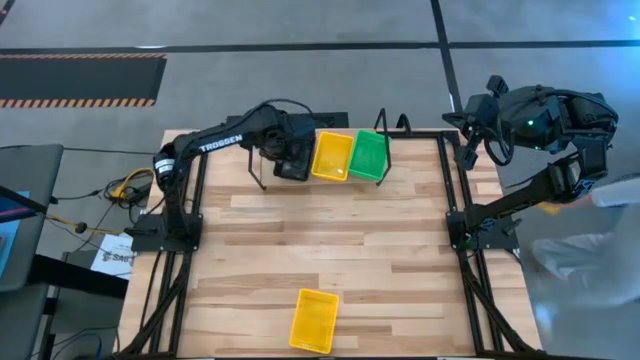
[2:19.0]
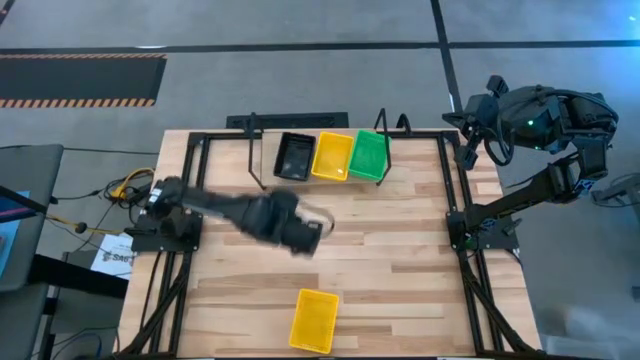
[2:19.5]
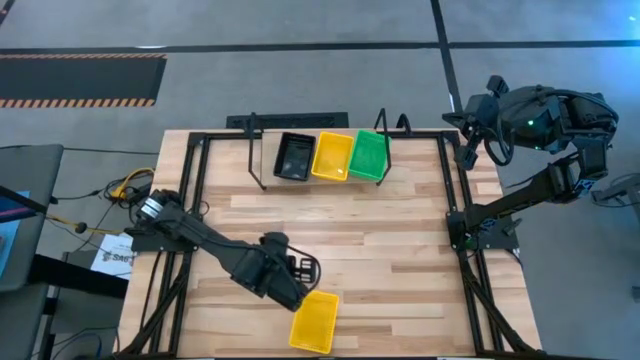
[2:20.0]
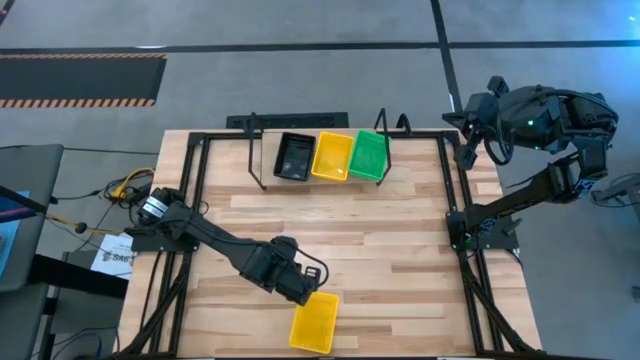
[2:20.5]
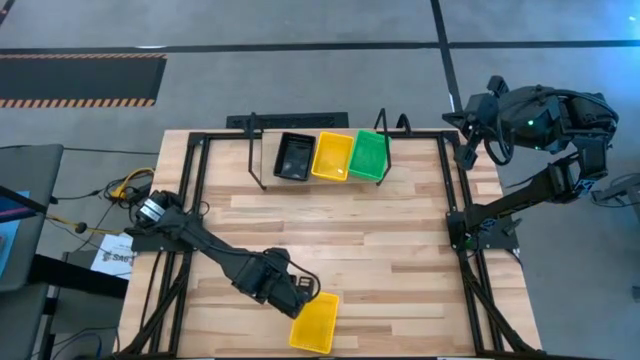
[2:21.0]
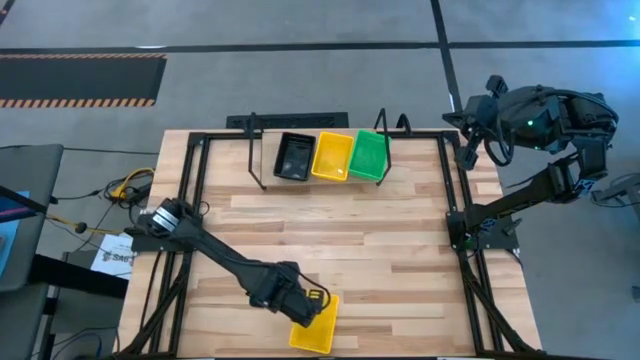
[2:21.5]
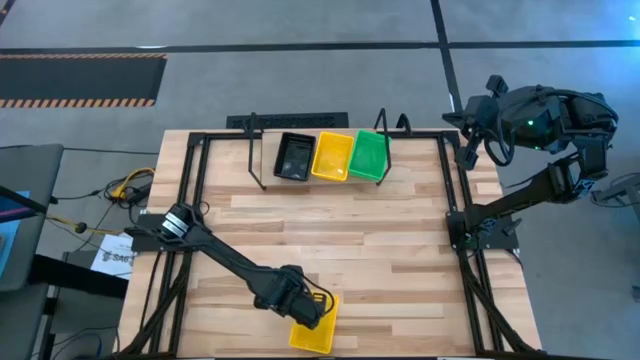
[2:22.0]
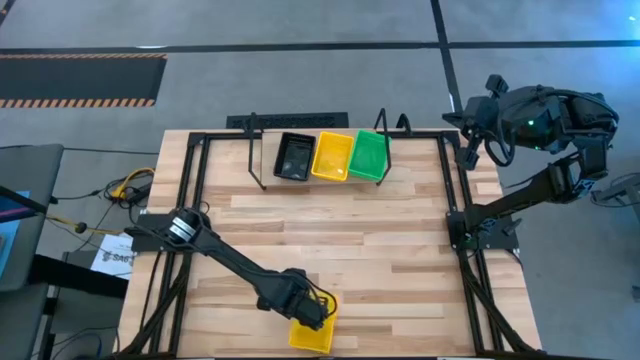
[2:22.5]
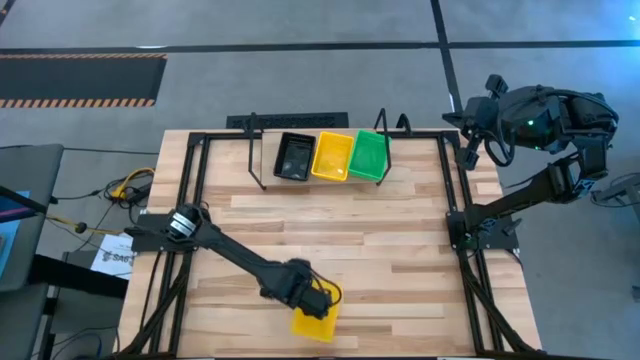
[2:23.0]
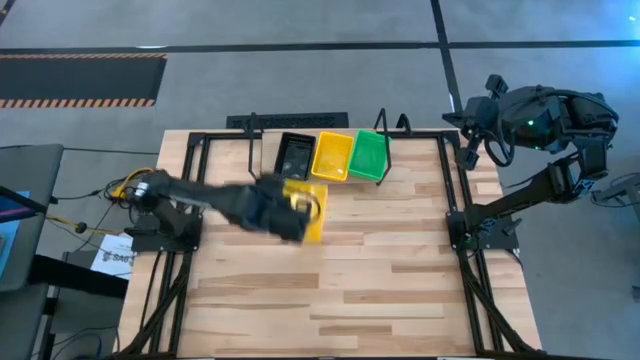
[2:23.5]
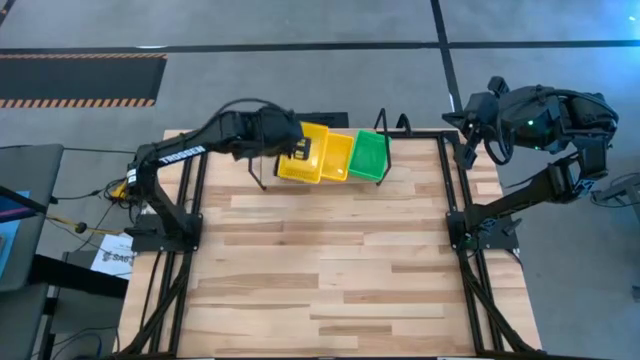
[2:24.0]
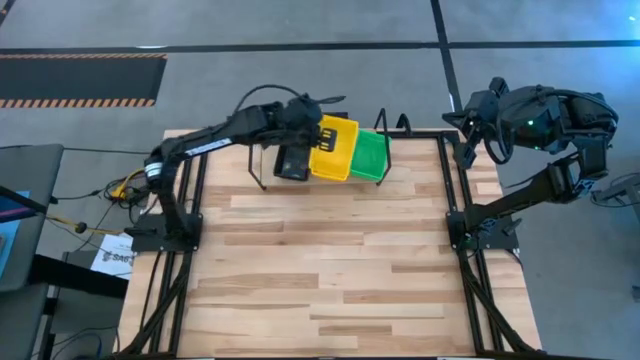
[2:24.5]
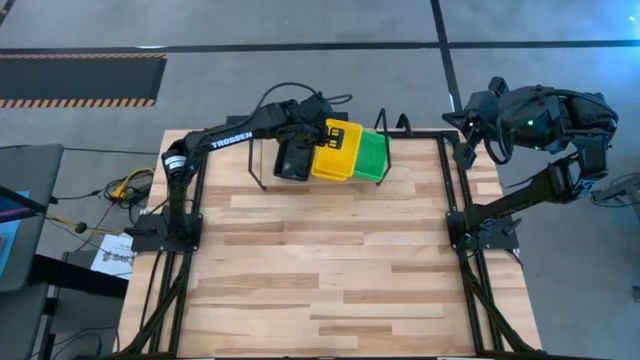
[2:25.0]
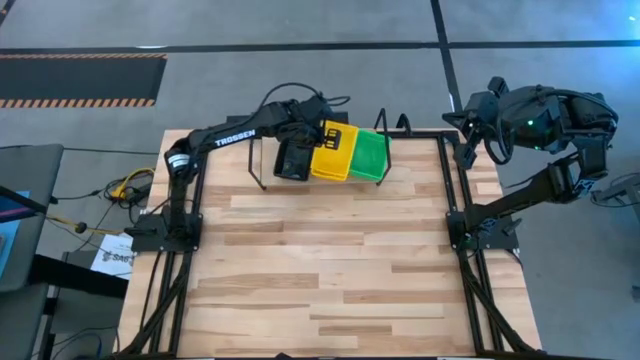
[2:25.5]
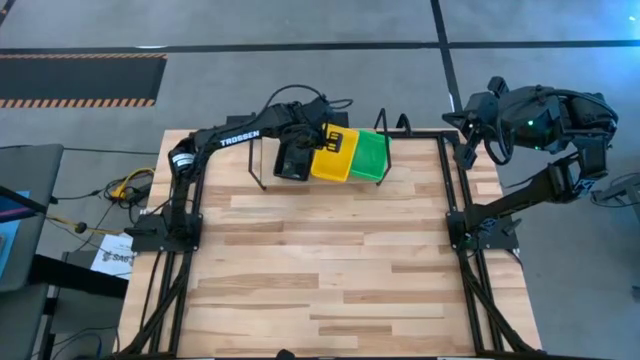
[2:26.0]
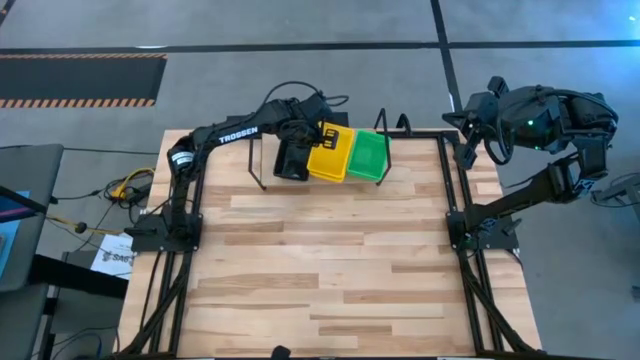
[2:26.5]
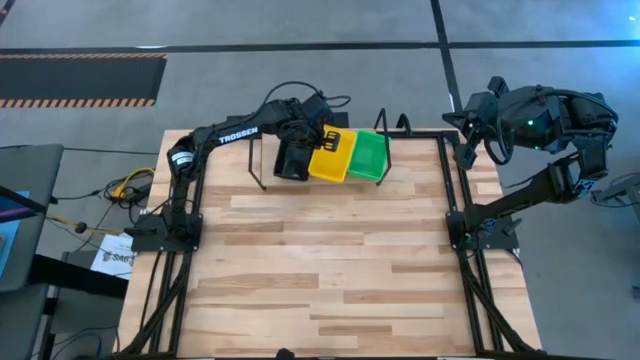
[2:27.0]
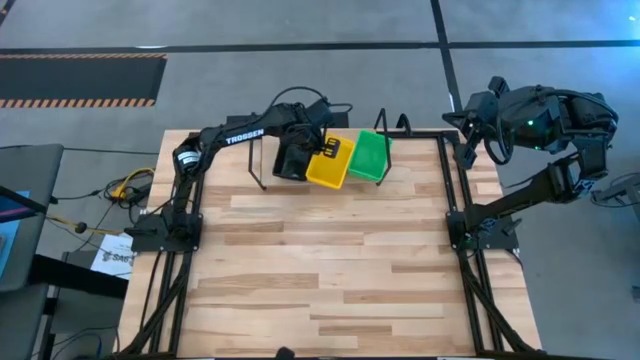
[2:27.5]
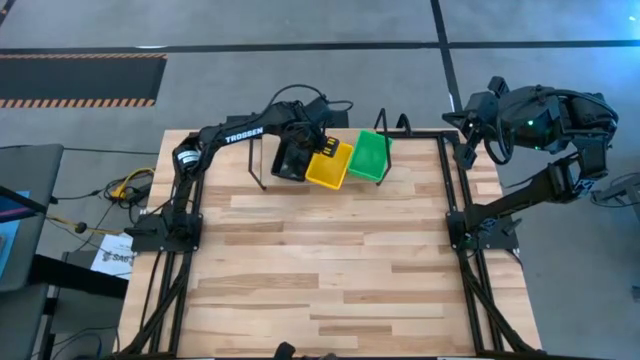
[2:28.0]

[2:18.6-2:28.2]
Task: Stack baskets on shelf by color
Stack the yellow bin on the yellow bin on the shelf

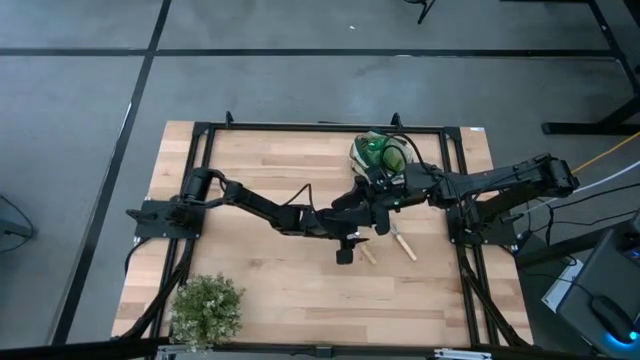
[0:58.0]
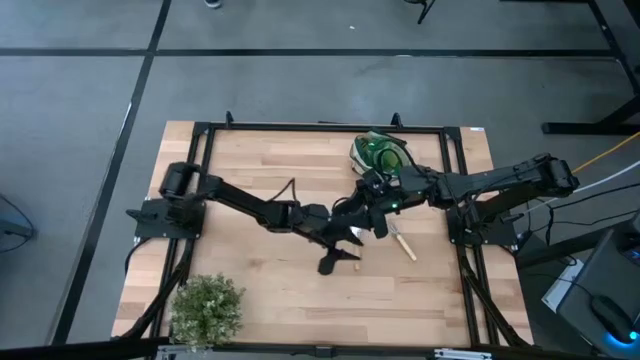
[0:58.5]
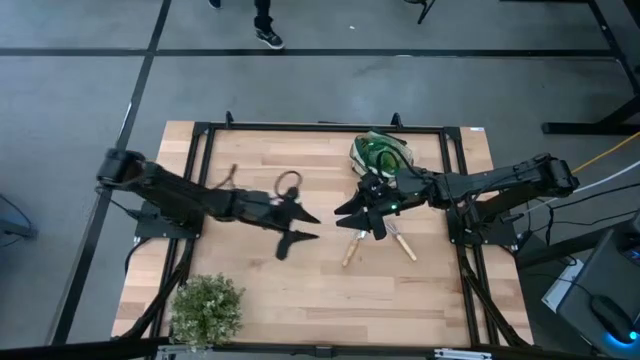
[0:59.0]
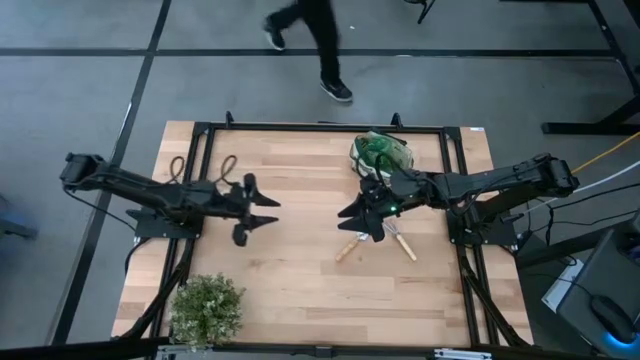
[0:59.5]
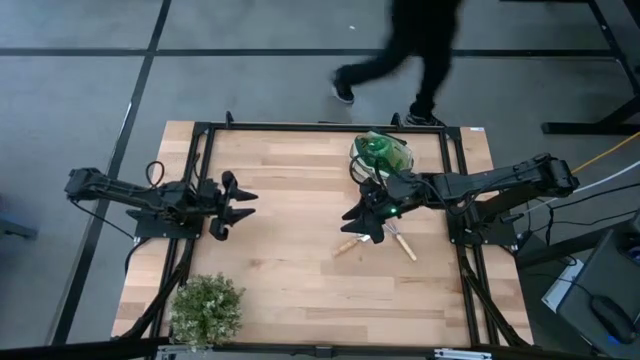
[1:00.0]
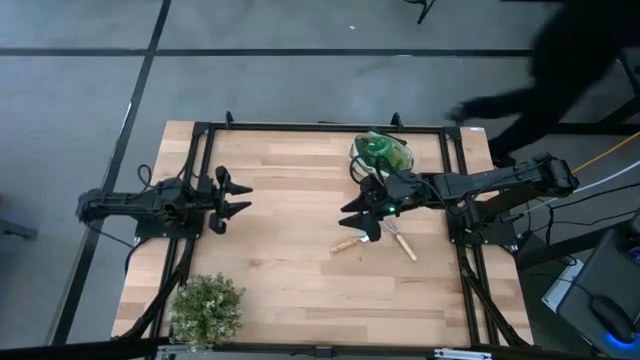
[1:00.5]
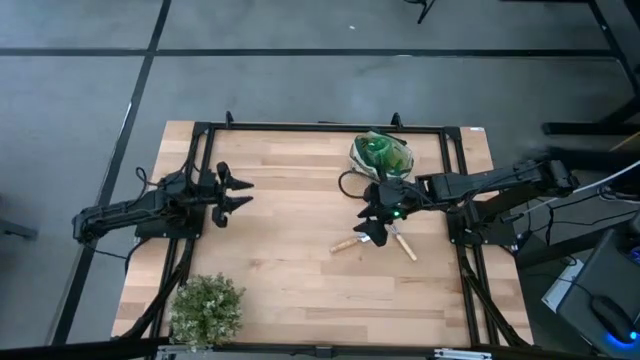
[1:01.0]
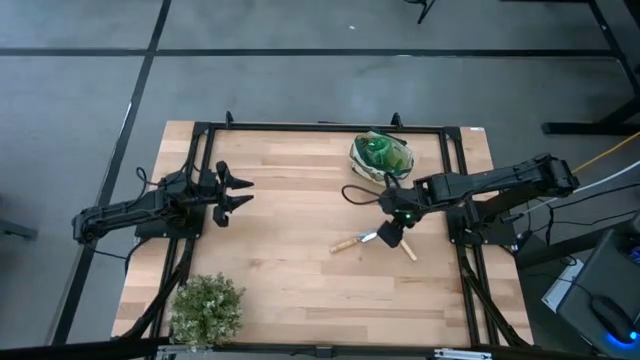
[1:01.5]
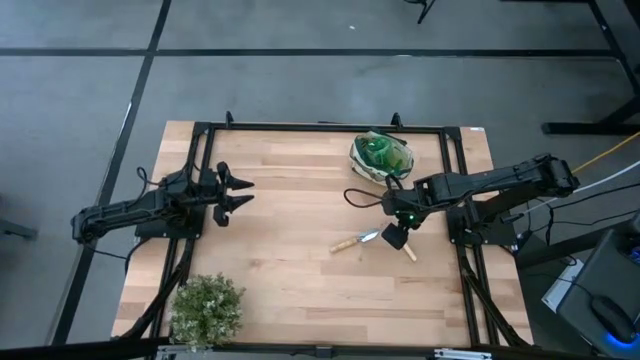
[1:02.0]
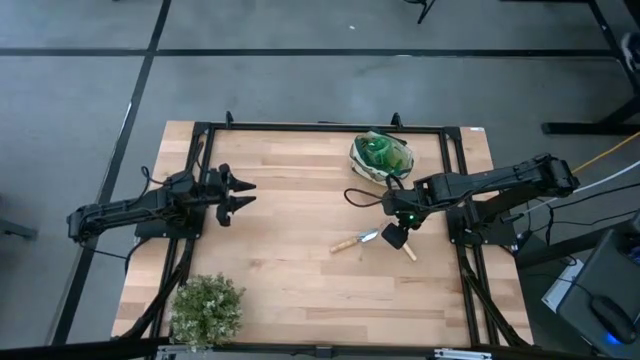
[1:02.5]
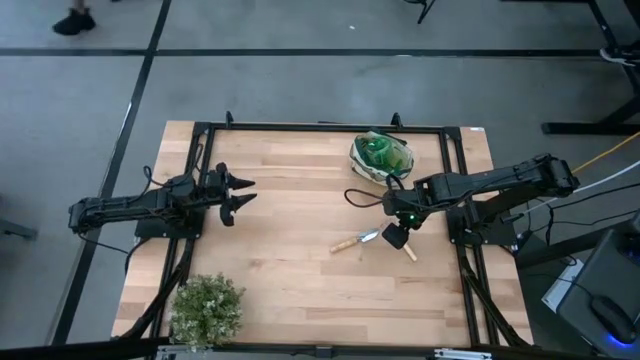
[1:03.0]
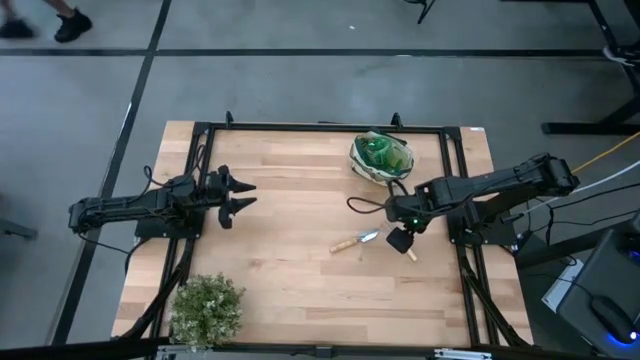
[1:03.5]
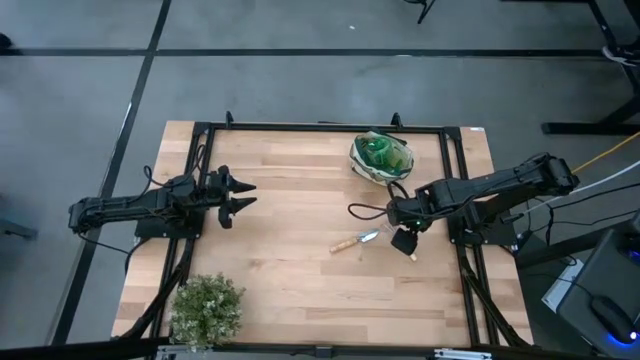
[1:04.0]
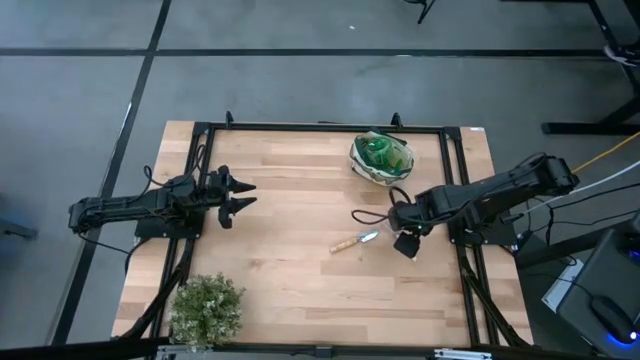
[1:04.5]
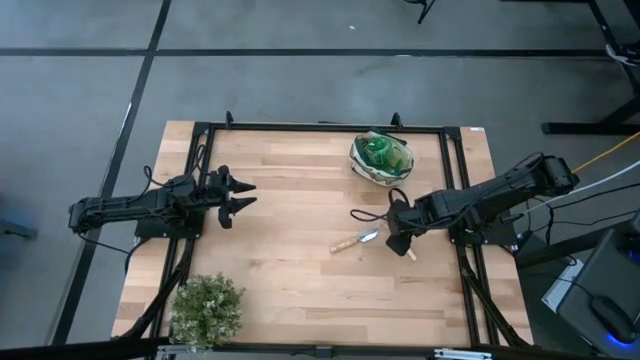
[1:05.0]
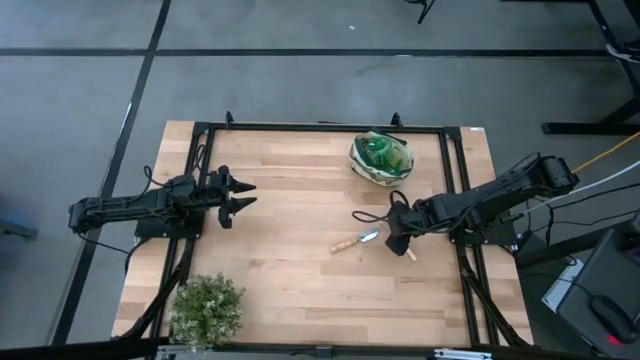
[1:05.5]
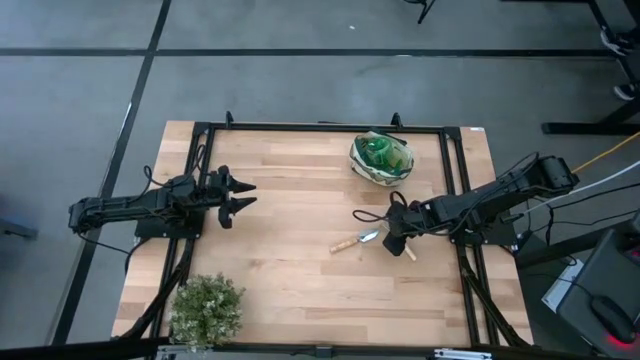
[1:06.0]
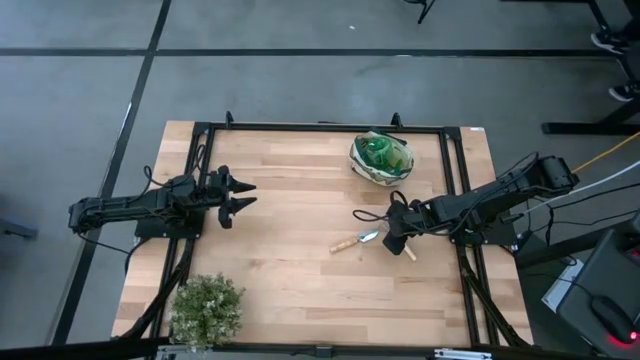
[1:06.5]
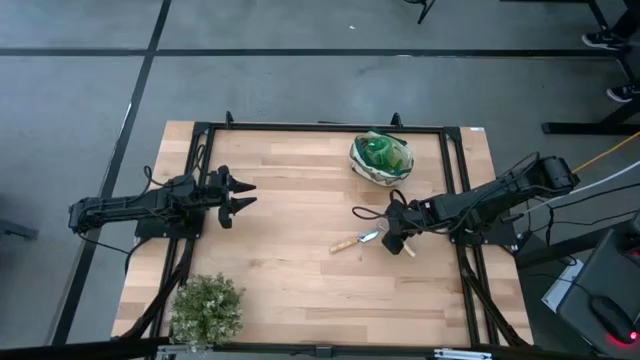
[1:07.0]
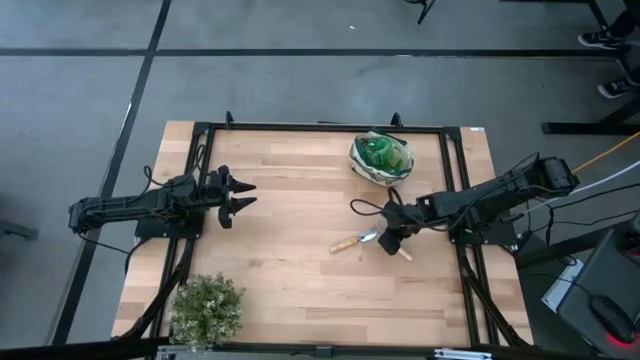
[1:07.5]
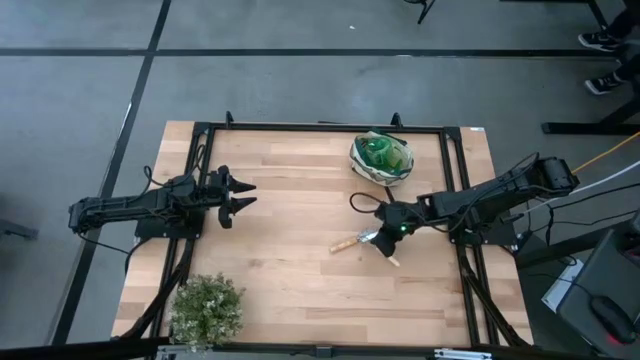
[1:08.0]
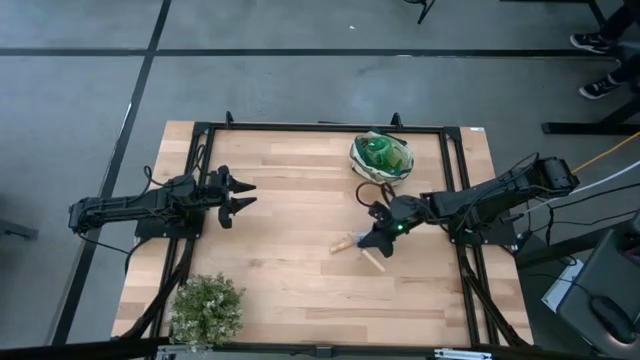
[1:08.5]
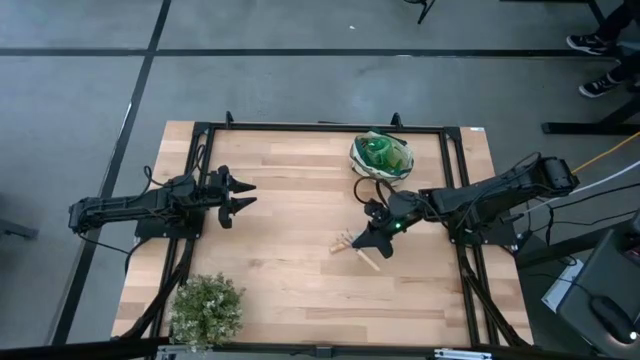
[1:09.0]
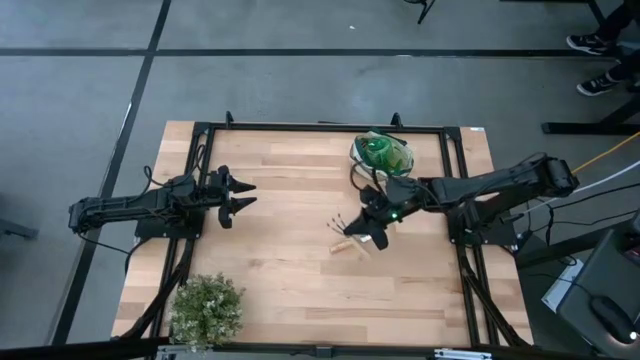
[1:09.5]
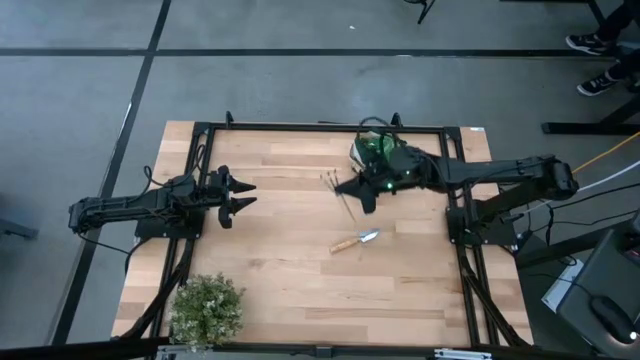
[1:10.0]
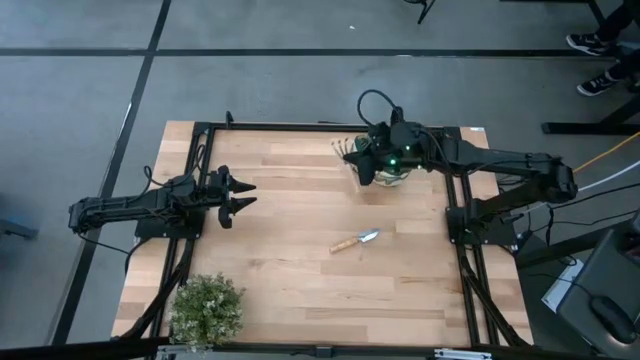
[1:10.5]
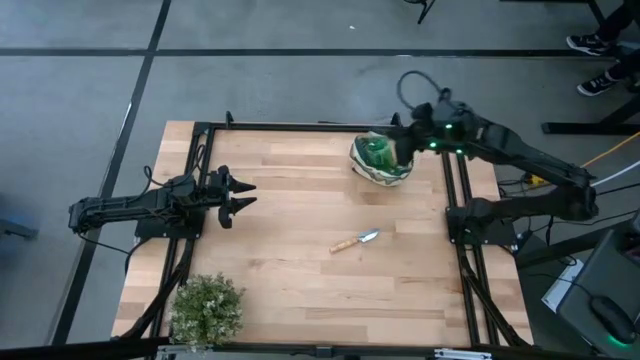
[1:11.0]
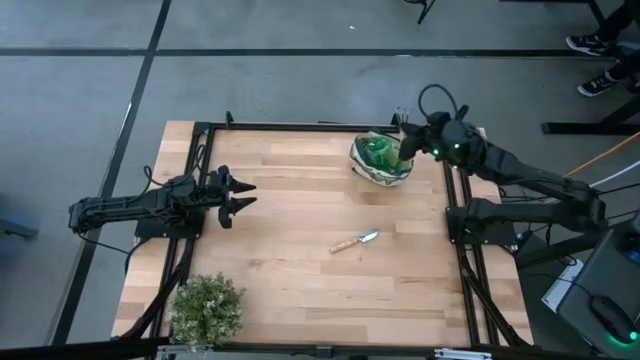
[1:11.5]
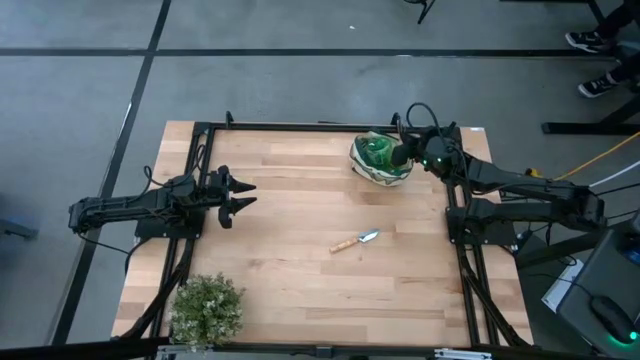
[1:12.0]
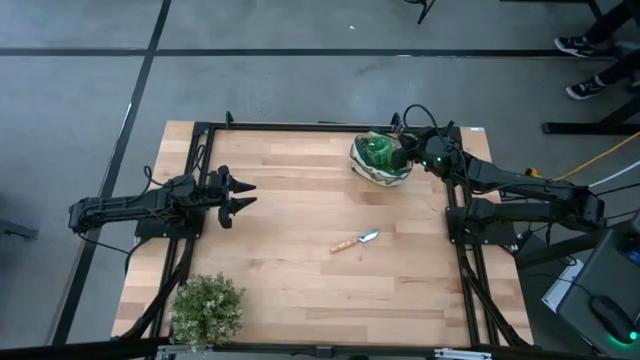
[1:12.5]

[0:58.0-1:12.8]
Task: Pick & Place Garden tools in Gardening bag
Put the mini rake into the white bag
